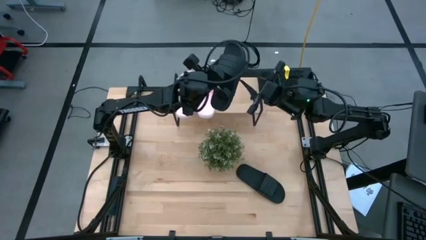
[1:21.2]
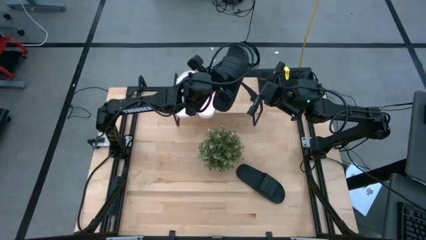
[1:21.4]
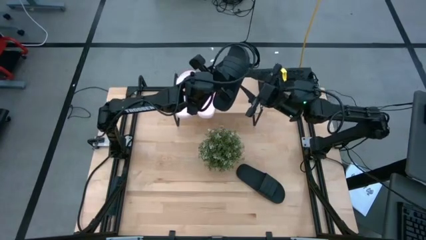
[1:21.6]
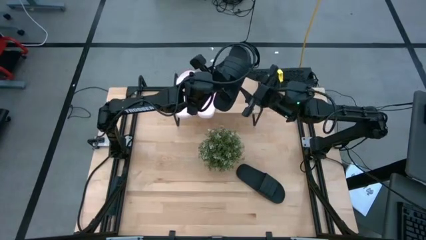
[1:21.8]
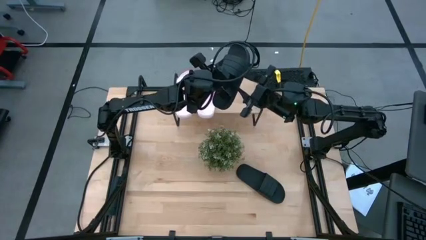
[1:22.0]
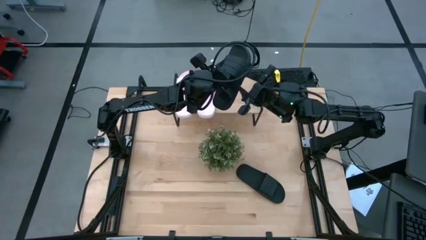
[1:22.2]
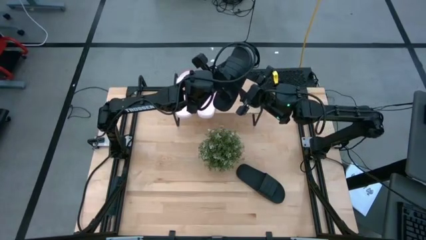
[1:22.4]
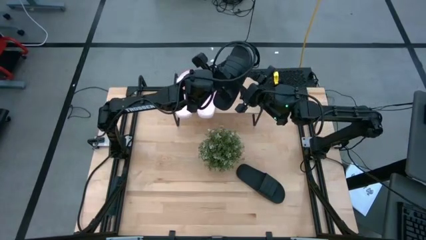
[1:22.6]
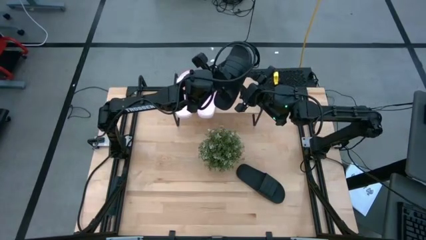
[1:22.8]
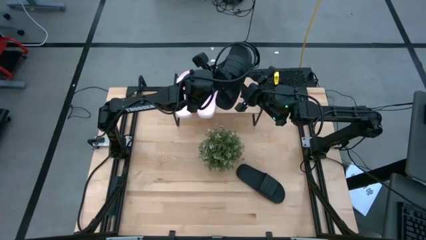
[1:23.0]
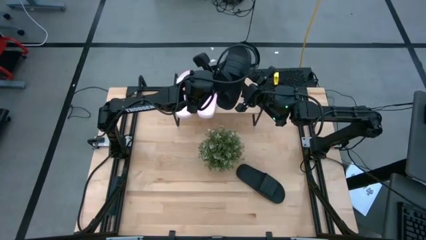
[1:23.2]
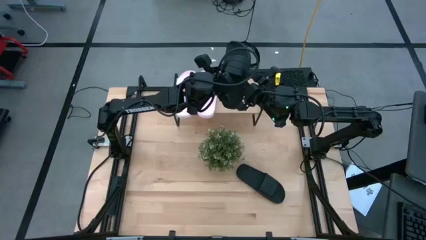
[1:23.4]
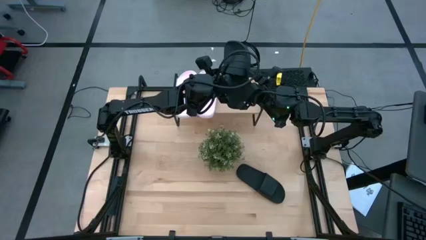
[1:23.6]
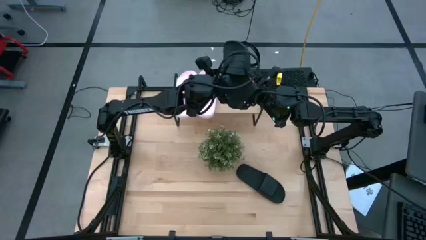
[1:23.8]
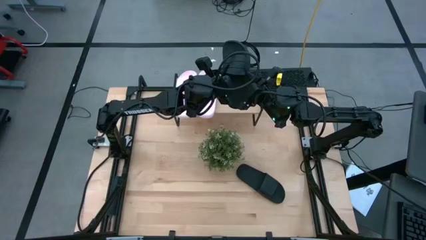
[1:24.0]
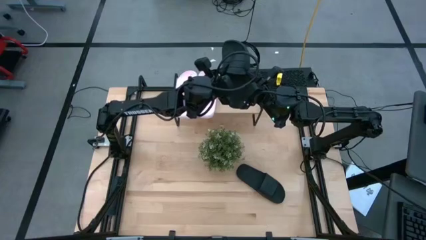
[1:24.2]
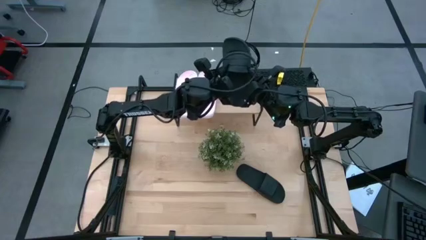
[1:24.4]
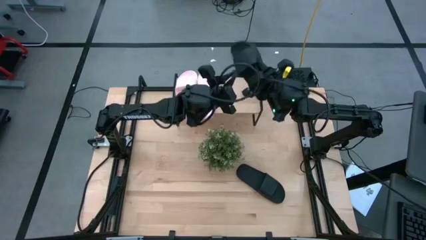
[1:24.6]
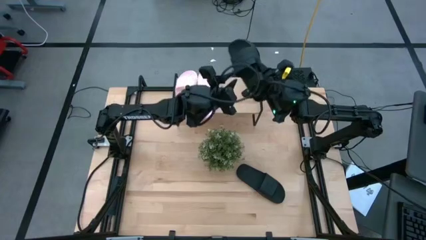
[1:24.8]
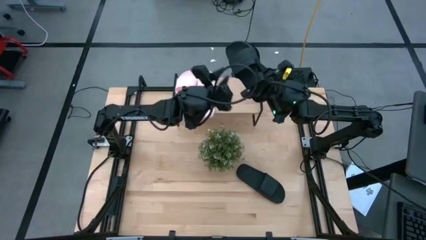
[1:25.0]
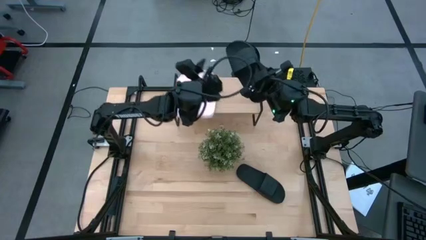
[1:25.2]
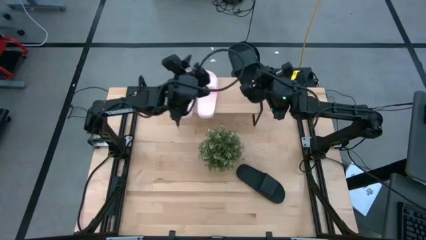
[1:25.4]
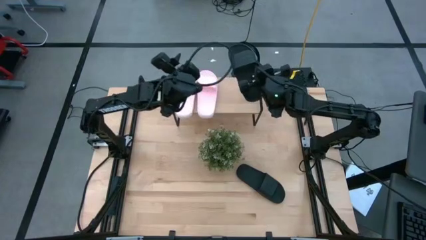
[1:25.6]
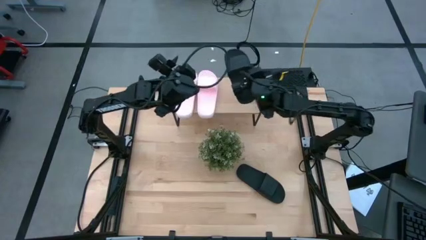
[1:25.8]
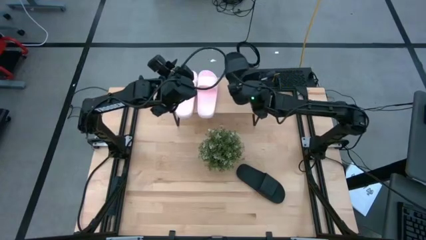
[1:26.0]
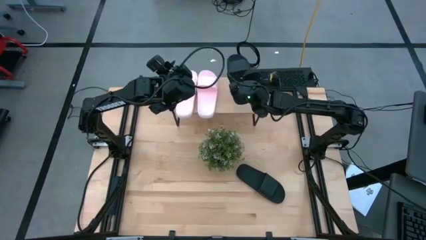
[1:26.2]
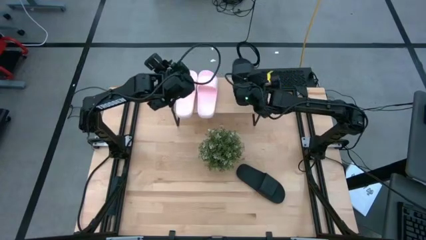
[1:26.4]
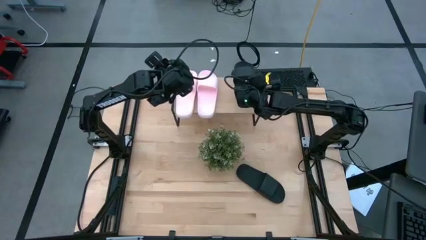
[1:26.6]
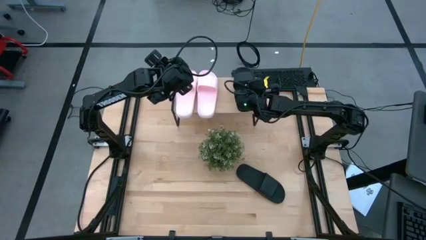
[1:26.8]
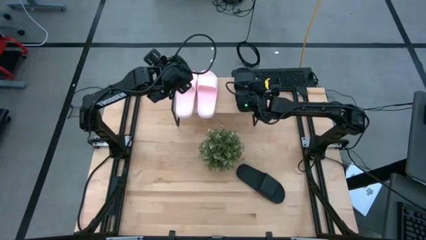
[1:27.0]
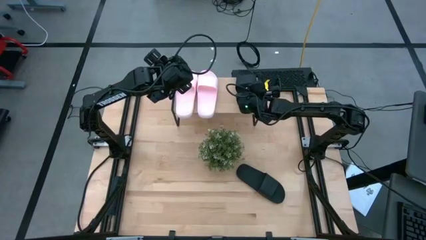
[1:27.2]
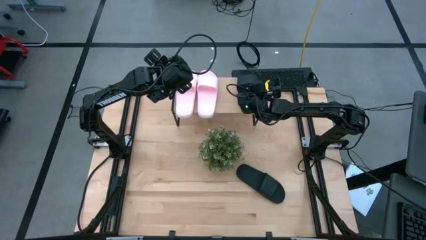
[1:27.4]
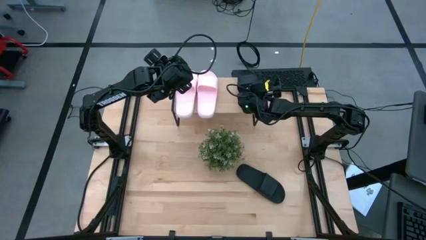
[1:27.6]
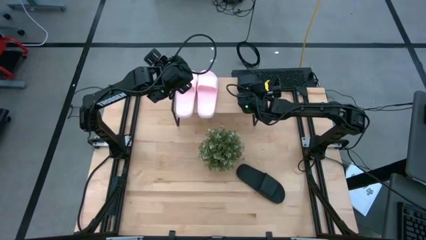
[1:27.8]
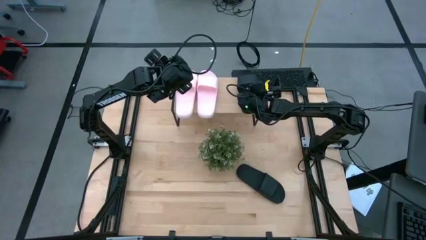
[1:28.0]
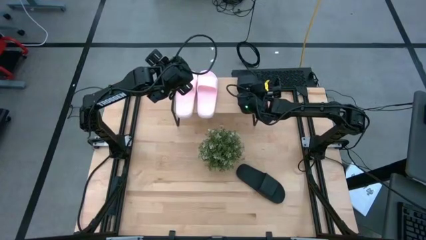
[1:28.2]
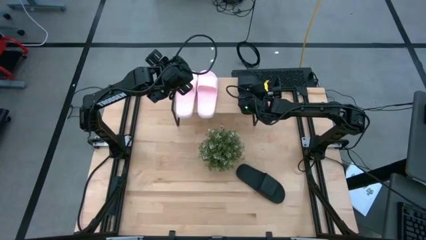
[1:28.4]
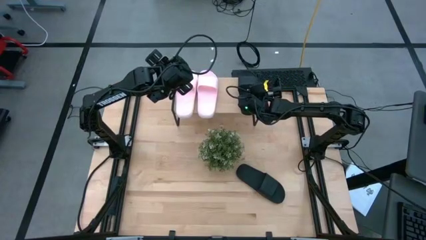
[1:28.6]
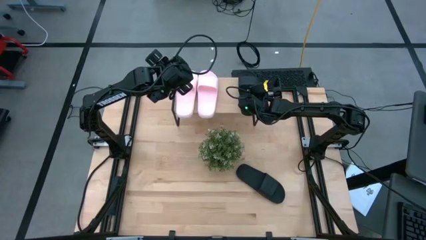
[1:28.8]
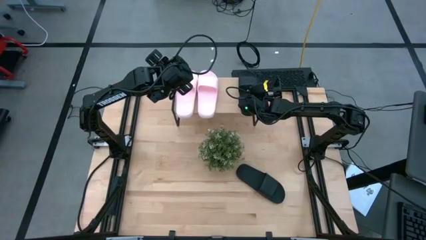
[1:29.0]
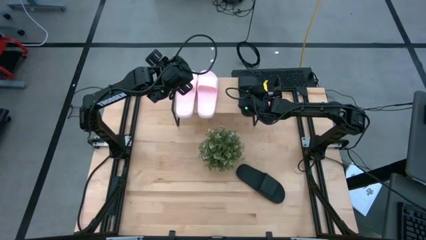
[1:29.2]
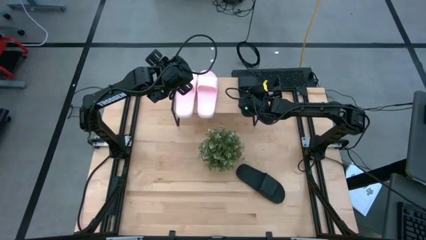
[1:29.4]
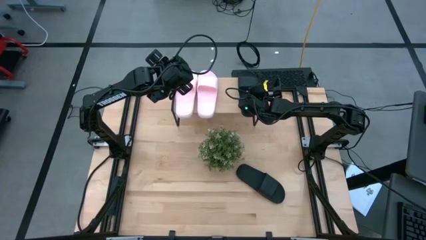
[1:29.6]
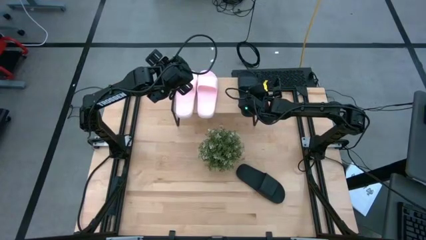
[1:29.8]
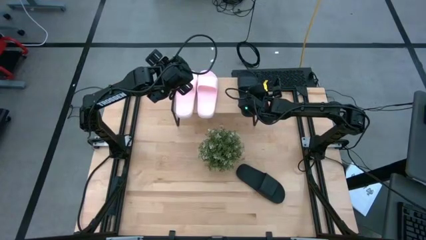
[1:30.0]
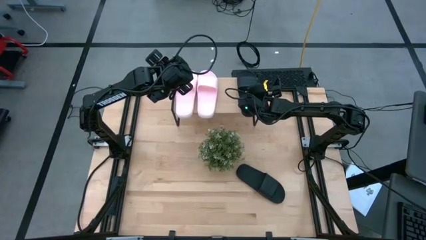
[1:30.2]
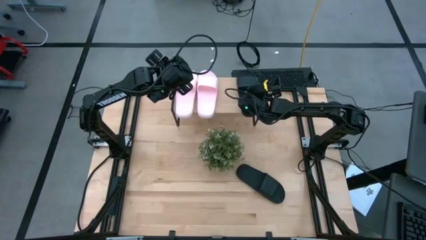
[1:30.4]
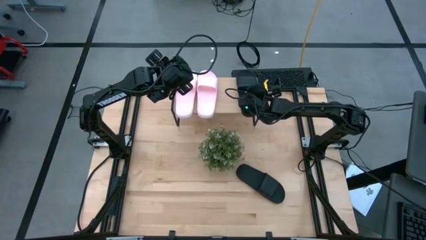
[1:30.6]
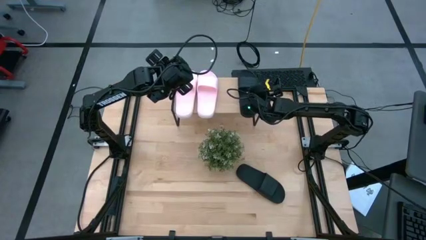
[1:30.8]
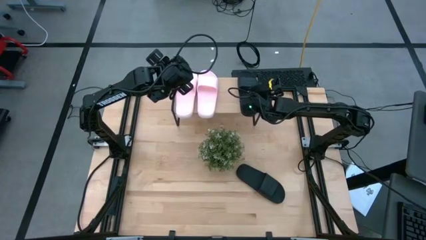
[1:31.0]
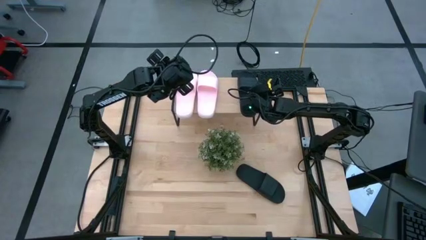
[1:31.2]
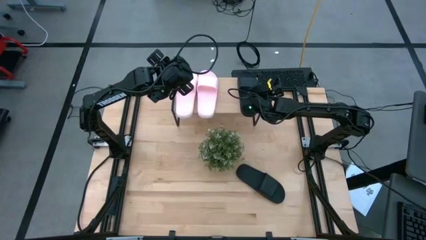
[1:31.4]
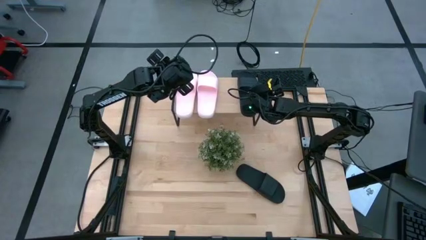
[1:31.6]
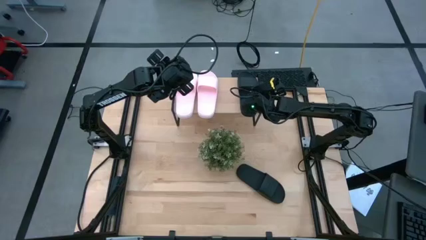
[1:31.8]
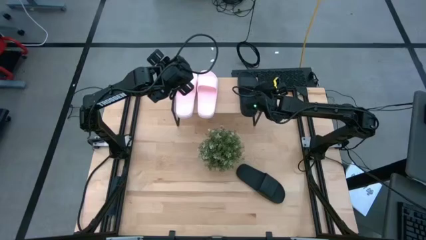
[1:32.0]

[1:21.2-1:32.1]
Task: Pick and place slides into the shelf
Put the top black slipper on the shelf
